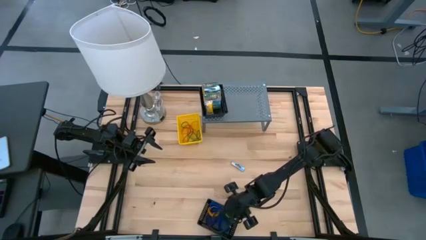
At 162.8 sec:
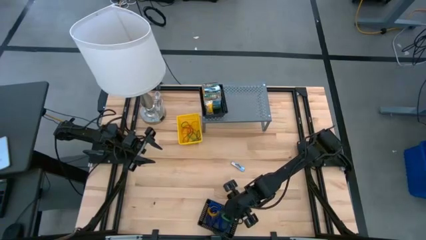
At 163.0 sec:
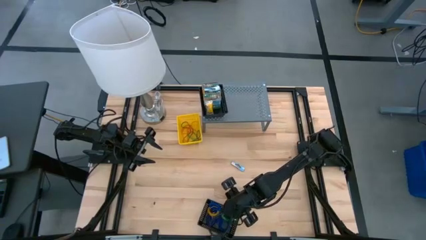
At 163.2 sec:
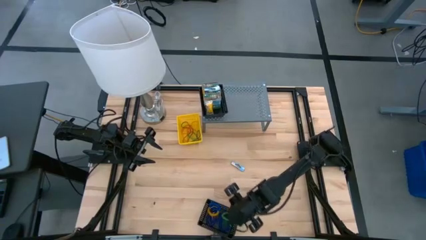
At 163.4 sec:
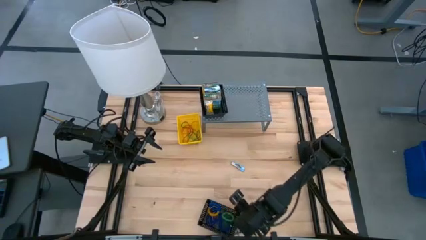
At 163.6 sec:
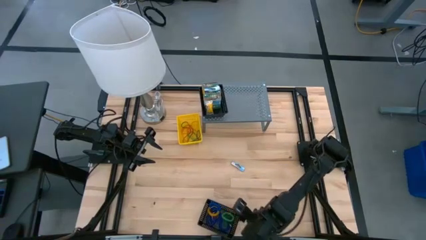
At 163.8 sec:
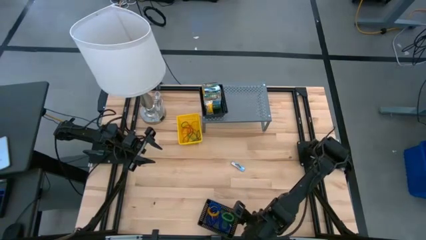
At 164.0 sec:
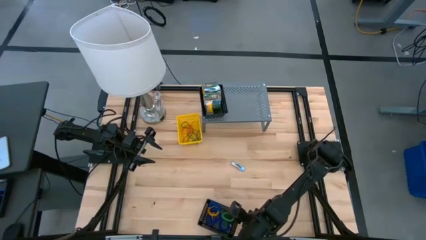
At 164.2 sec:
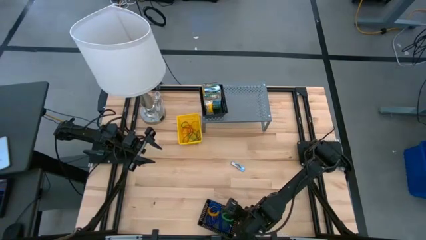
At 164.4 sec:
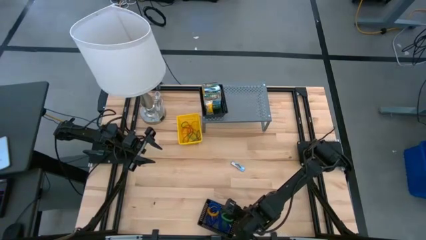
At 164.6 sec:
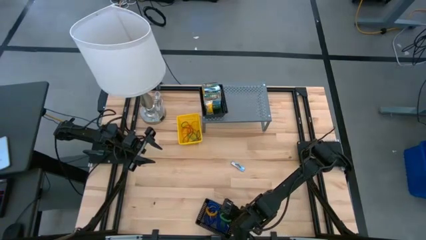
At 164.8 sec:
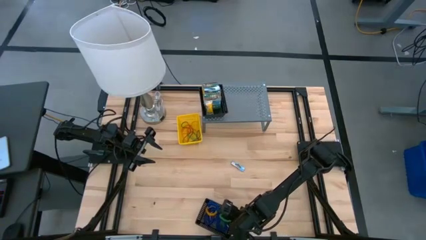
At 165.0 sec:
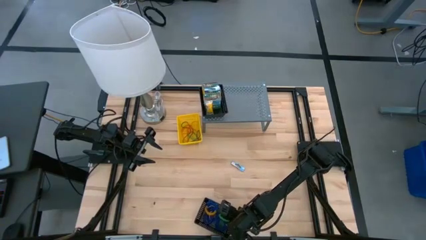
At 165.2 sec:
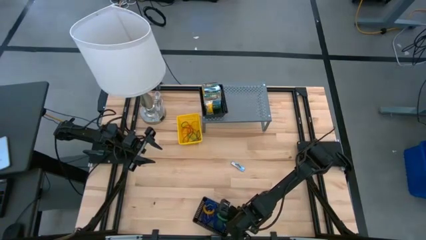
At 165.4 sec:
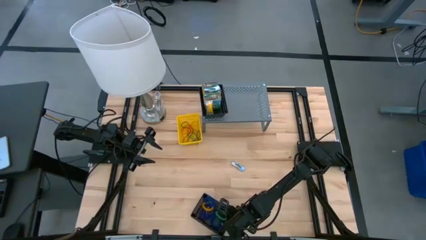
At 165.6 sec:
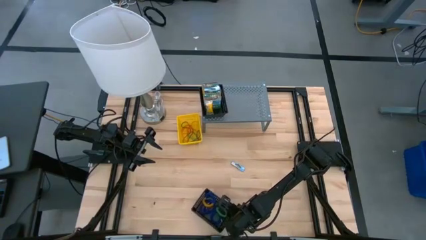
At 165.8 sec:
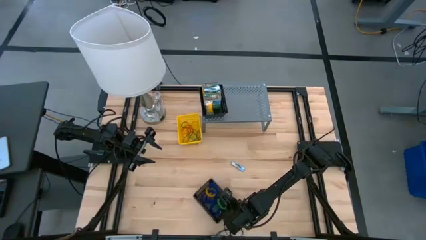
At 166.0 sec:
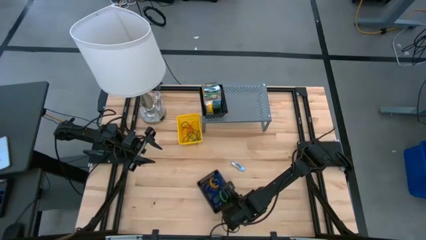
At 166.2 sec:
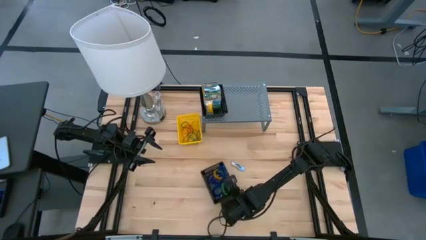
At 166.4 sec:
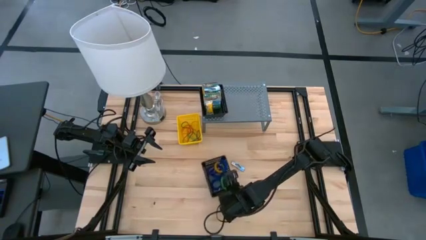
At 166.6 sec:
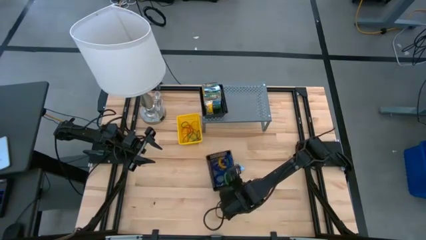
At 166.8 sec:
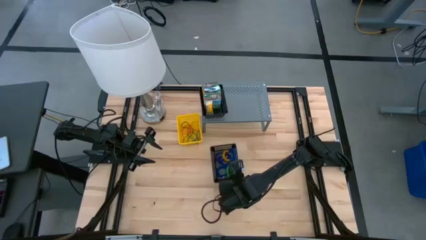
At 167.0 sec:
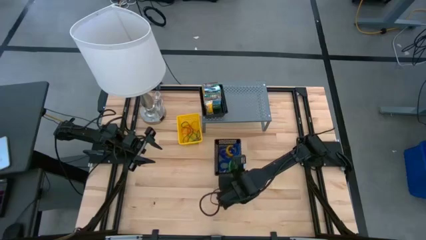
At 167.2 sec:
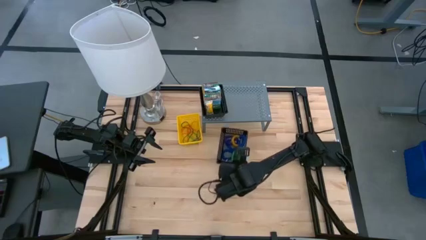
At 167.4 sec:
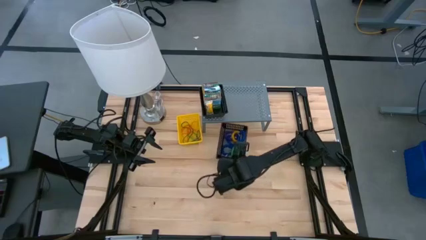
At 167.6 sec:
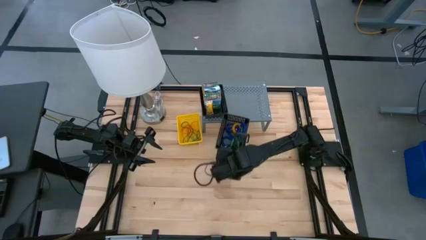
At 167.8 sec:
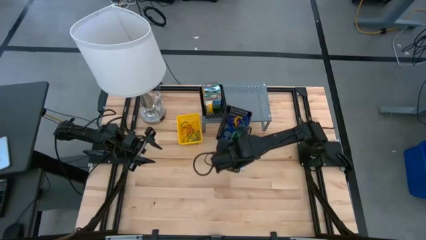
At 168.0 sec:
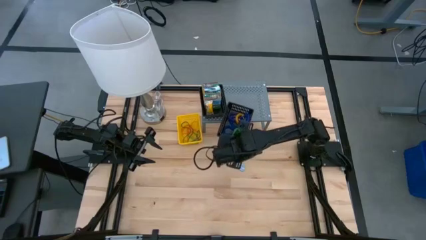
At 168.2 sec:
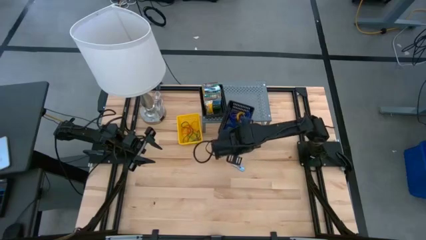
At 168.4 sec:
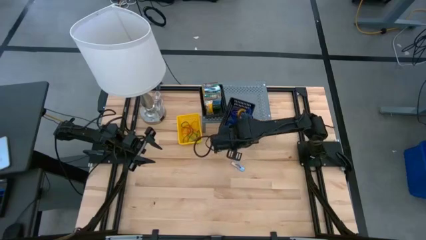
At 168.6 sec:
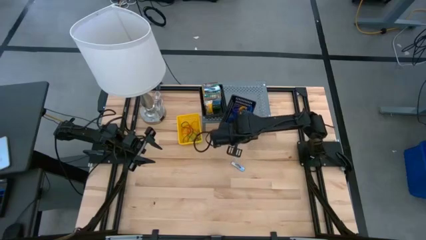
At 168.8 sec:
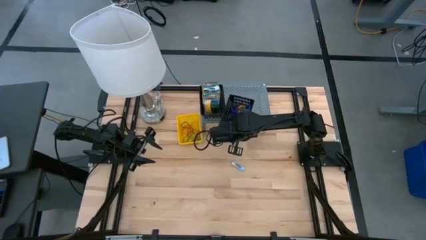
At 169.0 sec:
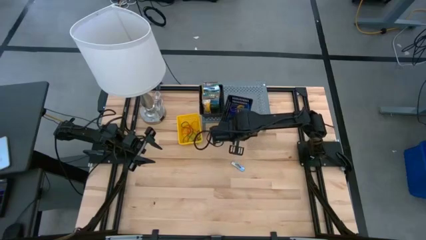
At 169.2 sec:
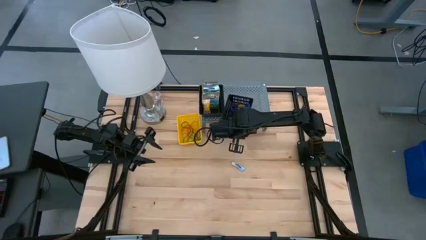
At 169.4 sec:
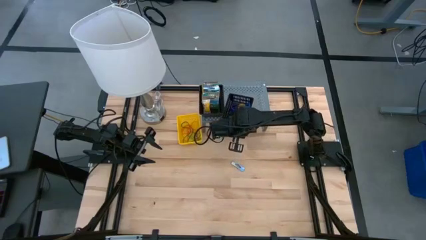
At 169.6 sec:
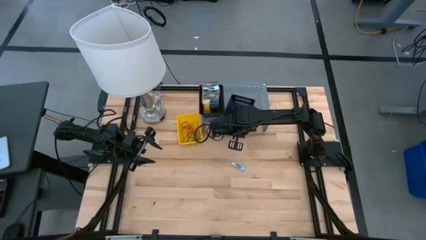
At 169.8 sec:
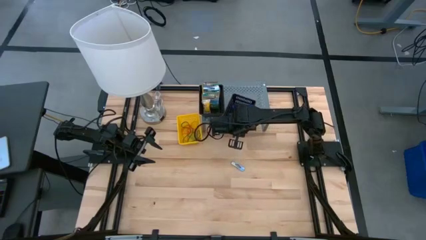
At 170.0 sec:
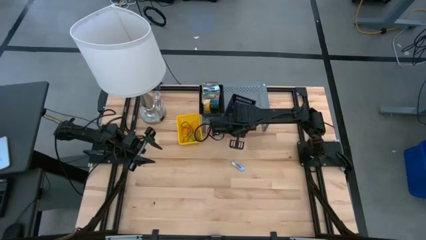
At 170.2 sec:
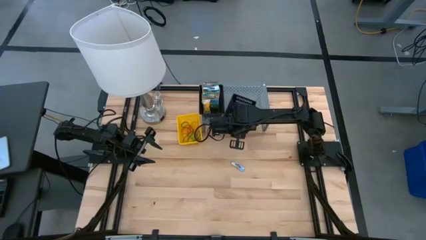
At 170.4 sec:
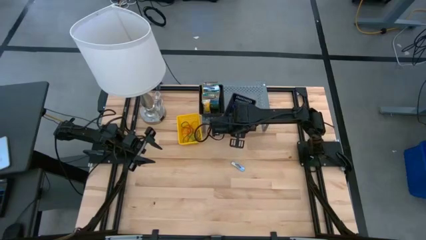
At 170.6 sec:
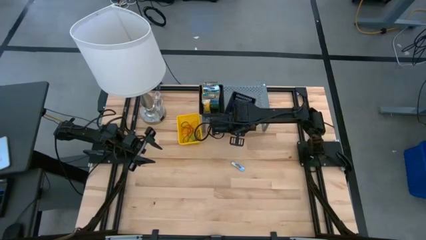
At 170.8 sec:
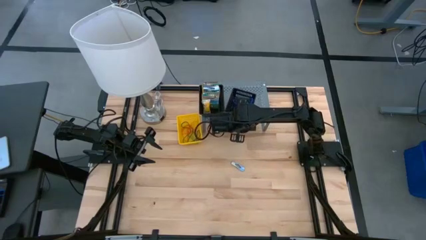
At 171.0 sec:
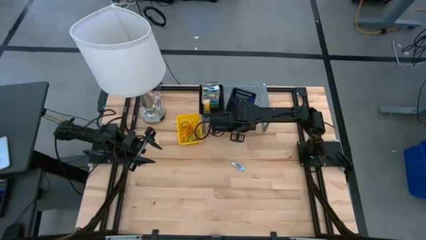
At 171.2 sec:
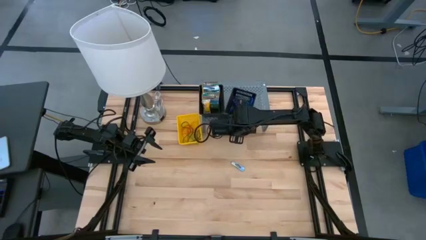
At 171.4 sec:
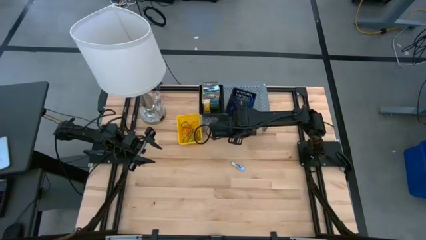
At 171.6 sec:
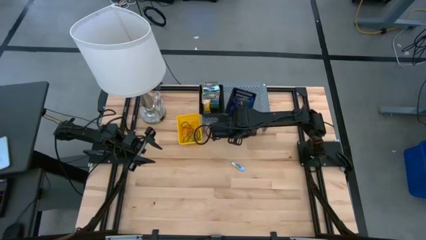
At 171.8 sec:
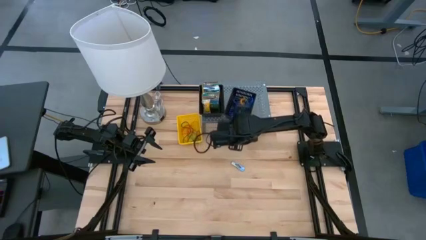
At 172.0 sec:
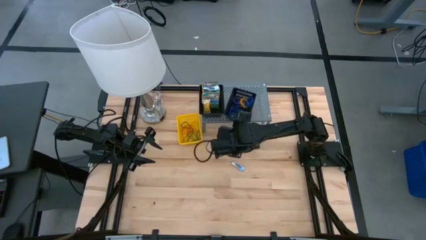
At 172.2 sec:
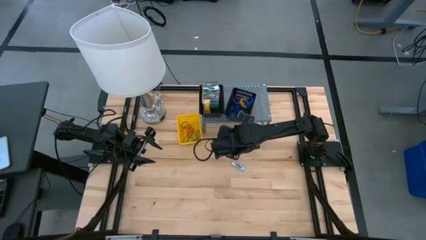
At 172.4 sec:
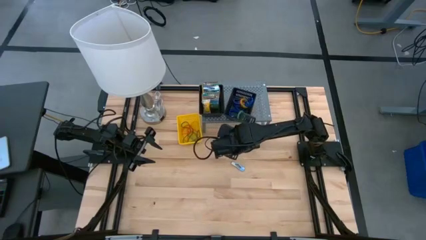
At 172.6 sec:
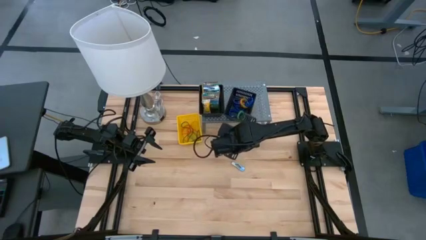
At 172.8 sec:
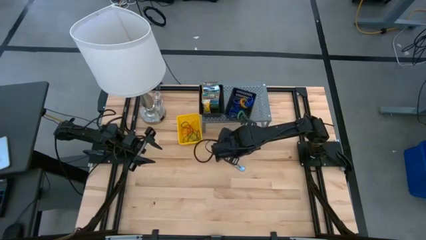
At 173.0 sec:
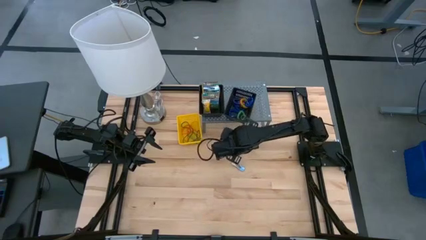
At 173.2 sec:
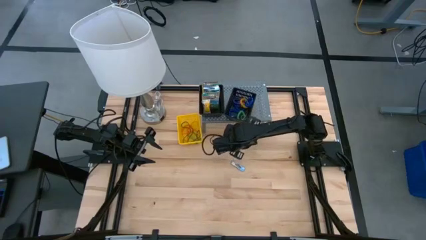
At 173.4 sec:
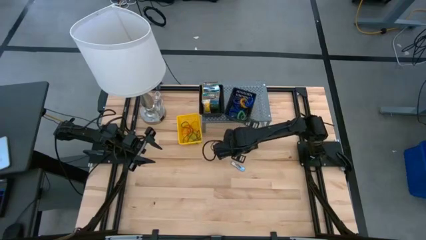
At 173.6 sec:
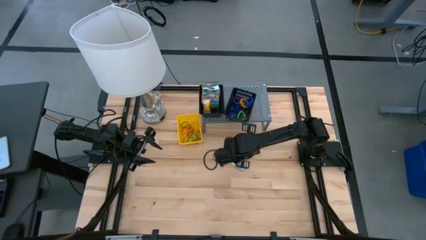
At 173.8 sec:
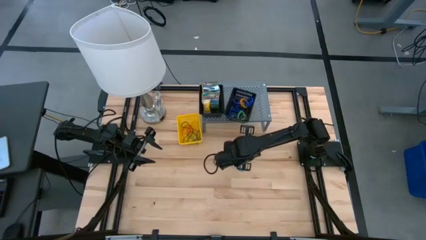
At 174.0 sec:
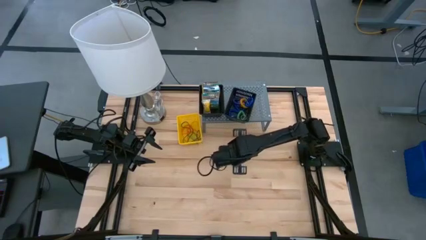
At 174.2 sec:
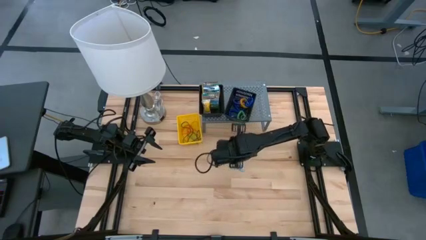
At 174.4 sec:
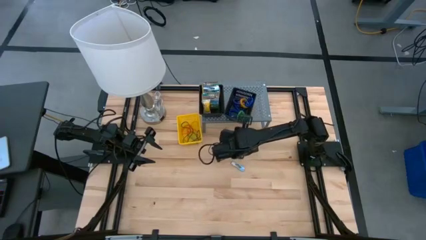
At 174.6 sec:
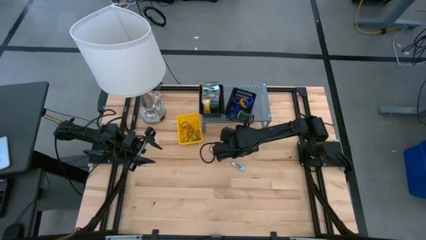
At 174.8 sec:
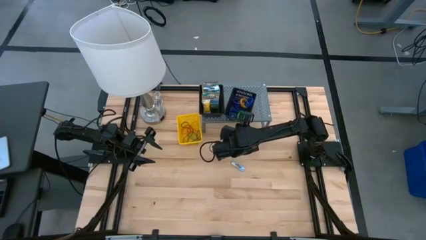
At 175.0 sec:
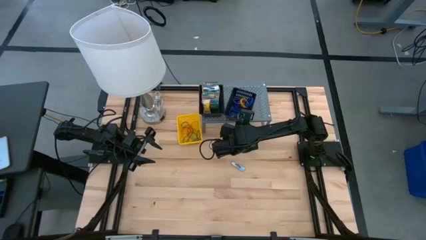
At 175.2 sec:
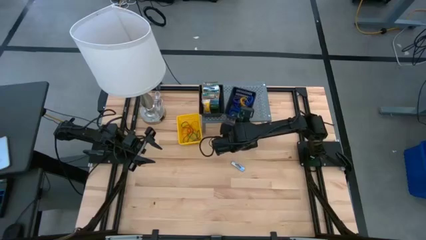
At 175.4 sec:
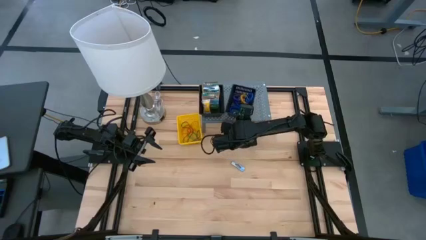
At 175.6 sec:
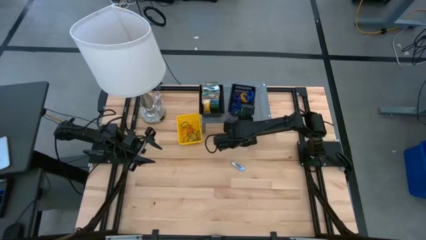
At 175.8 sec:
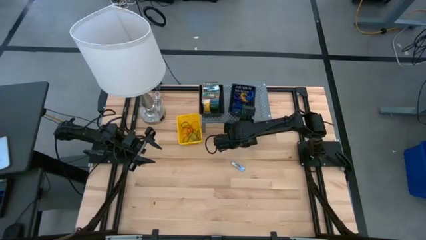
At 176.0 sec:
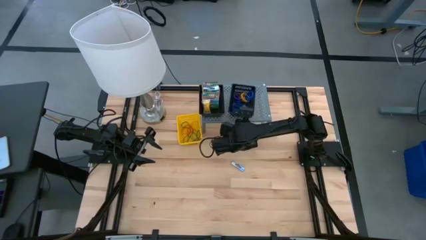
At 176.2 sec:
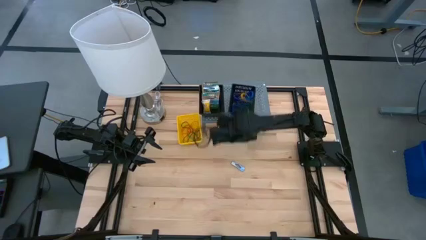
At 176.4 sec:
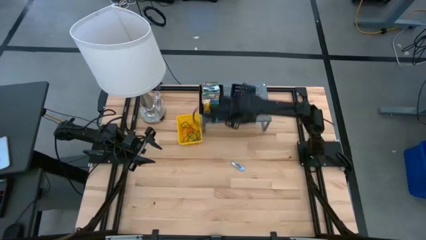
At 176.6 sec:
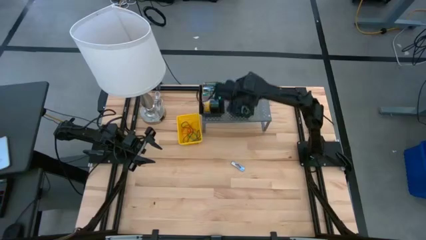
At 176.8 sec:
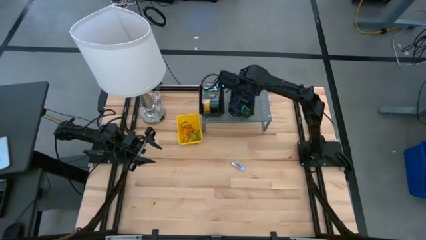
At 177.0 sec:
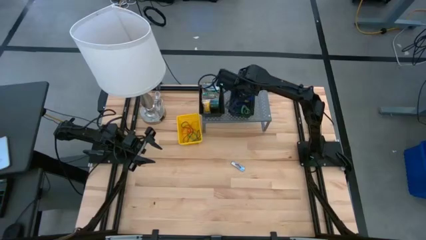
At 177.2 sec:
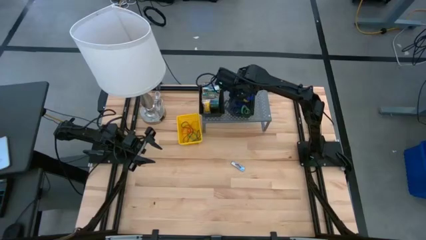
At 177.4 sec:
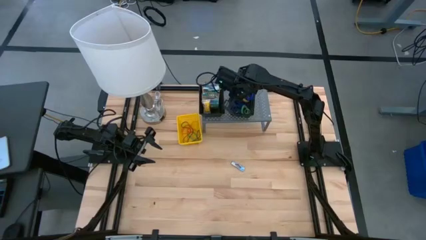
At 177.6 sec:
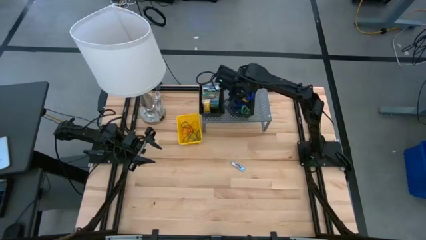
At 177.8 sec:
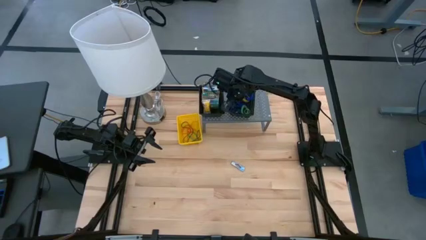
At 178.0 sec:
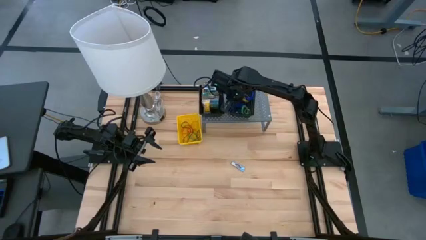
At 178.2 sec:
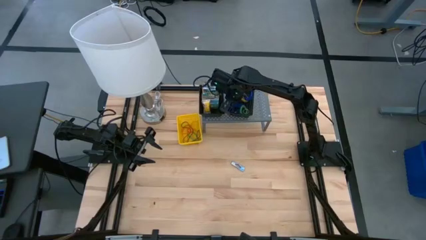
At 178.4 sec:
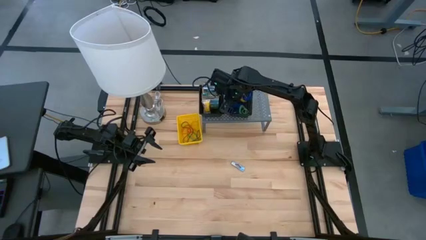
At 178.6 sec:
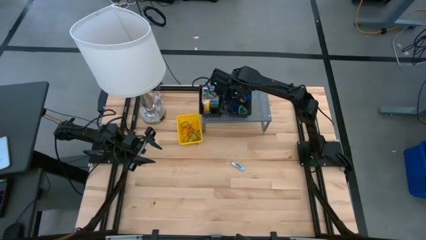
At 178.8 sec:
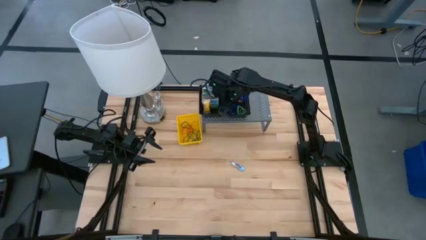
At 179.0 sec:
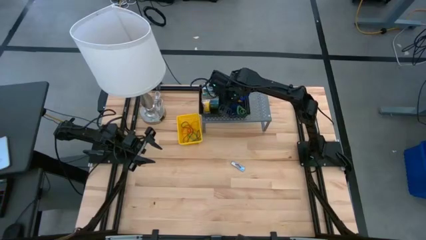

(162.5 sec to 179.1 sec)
Task: Pick & Place Office Desk Supplies
Put the black bin on the shelf
